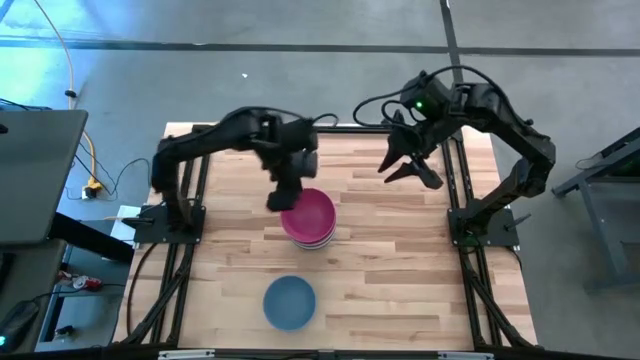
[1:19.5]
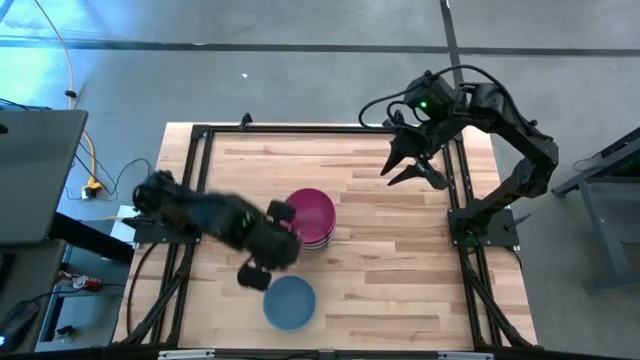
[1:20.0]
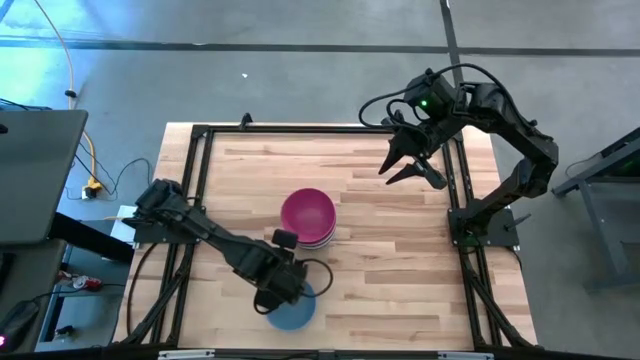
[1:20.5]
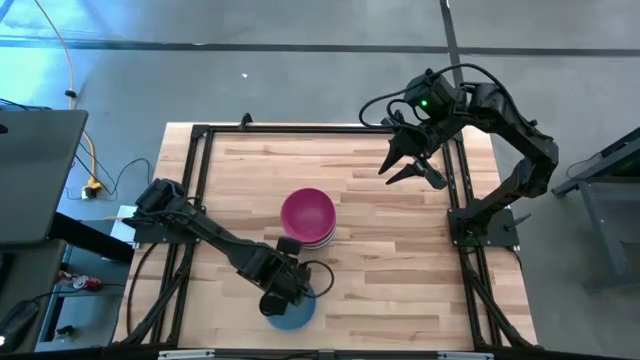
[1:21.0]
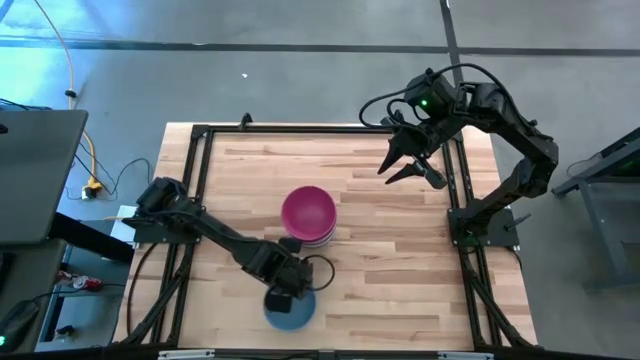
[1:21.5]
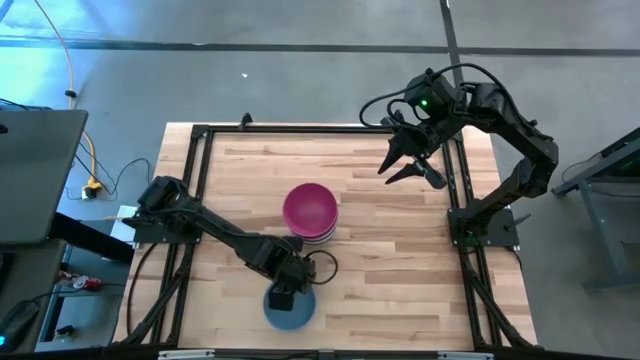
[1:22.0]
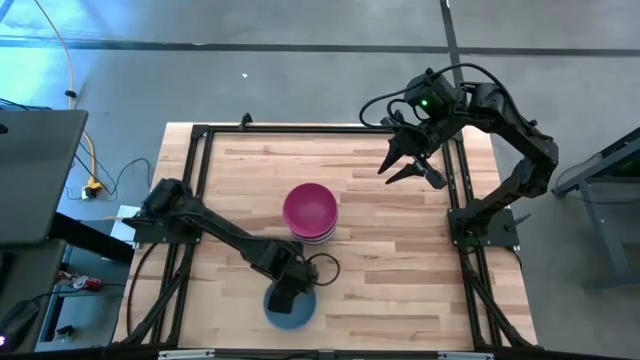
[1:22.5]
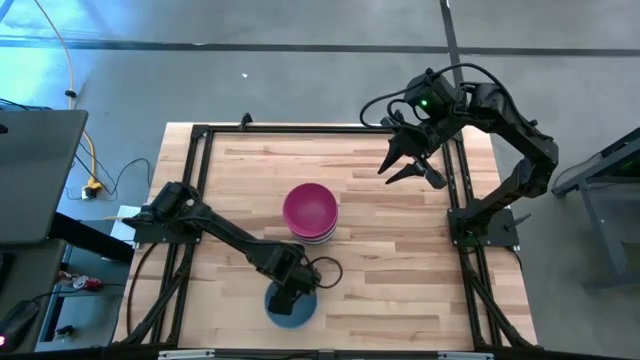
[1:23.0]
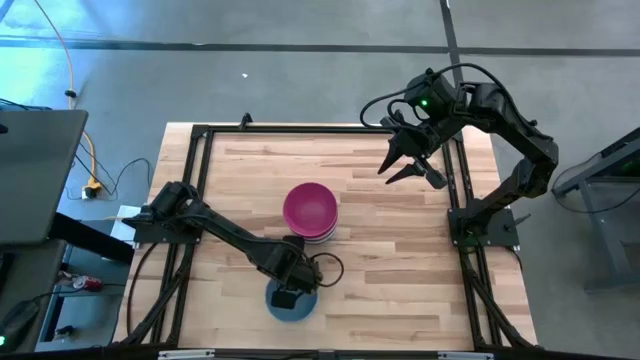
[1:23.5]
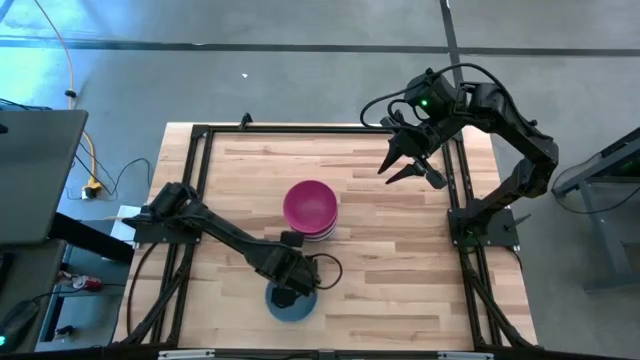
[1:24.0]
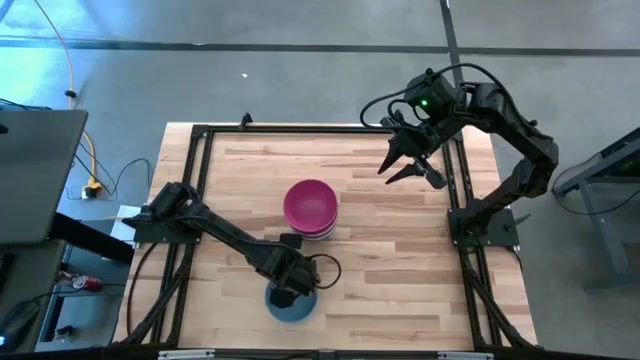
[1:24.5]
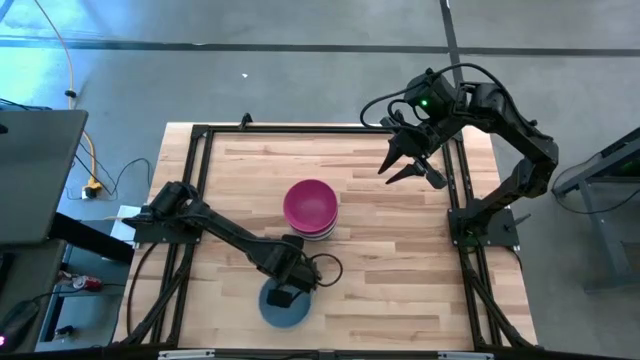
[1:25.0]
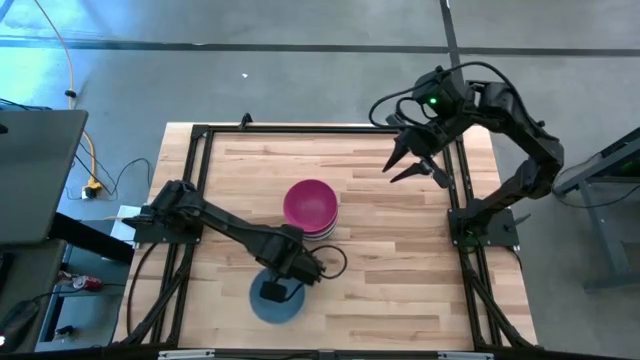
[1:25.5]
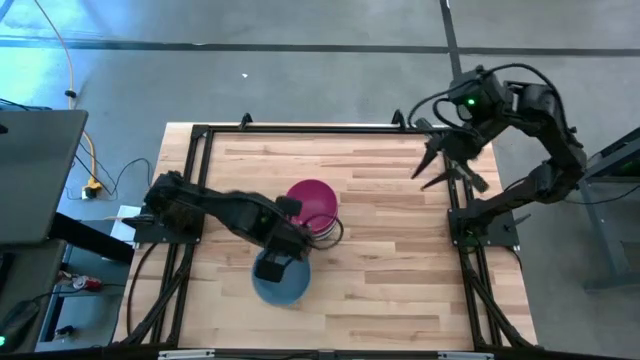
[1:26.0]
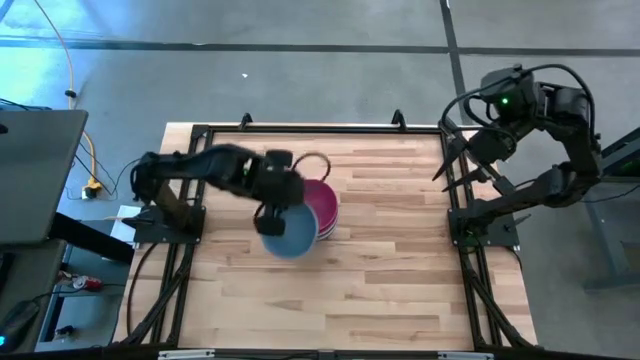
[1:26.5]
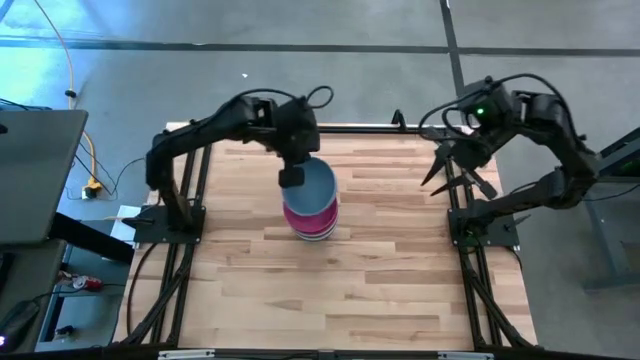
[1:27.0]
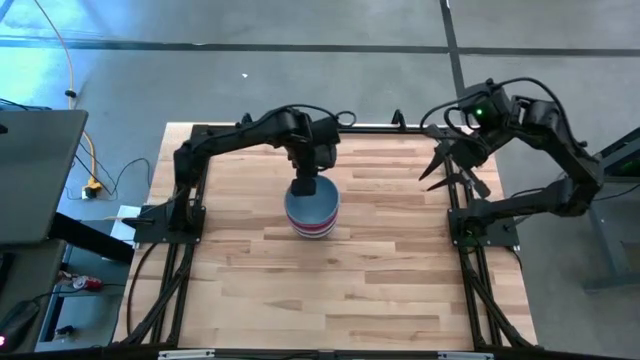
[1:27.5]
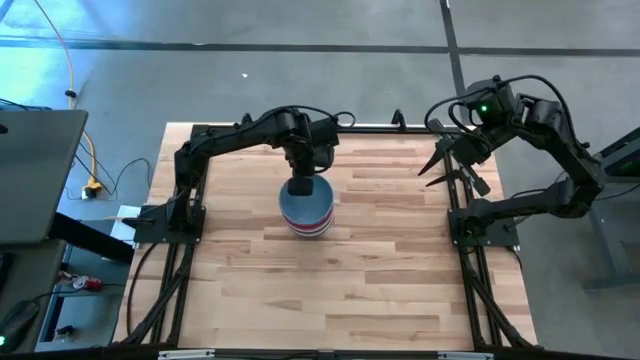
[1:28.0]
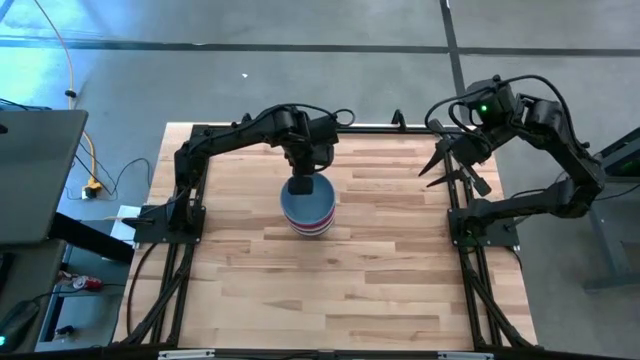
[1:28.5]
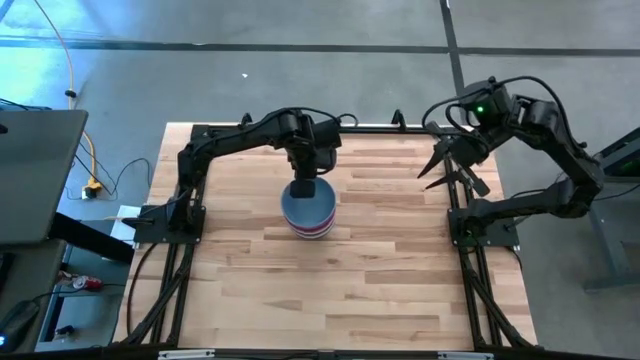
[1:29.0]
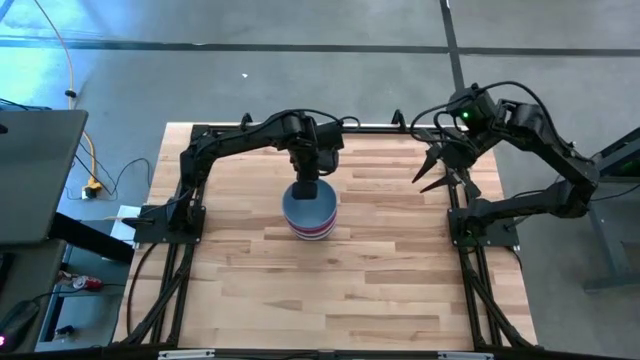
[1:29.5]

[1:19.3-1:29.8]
Task: Nest bowls inside each other
Stack the blue bowl on top of the pink bowl

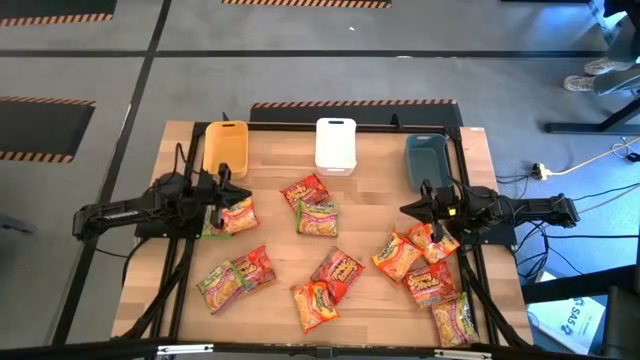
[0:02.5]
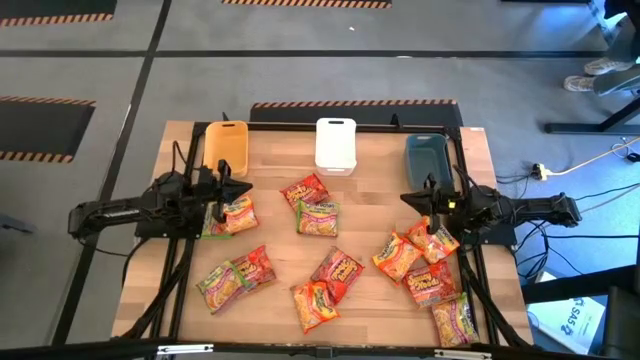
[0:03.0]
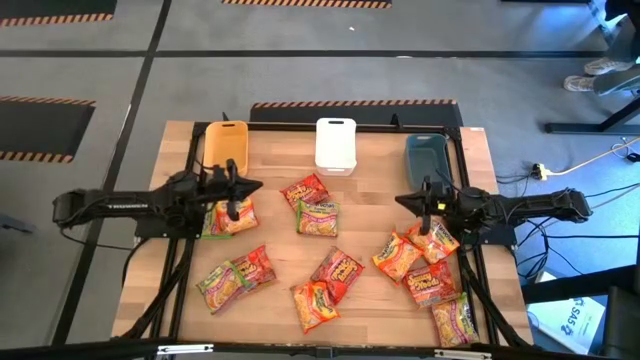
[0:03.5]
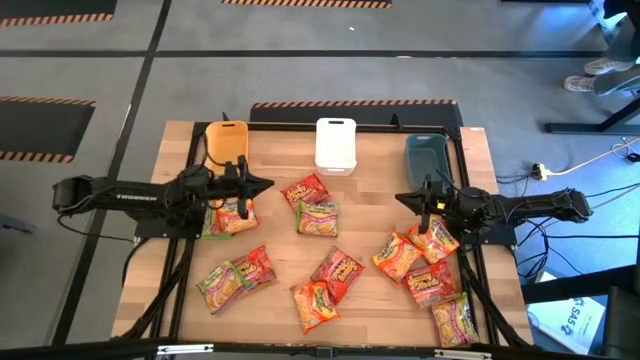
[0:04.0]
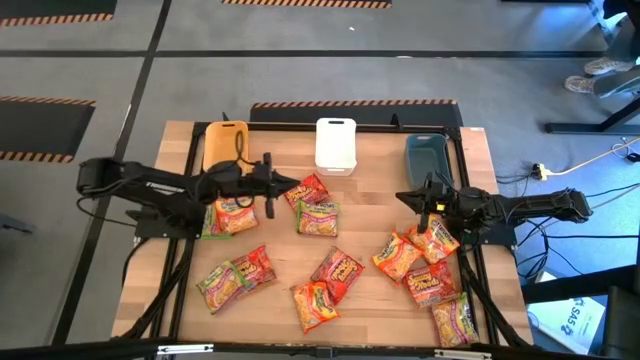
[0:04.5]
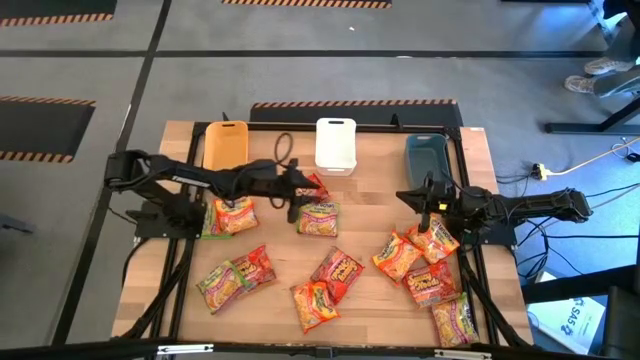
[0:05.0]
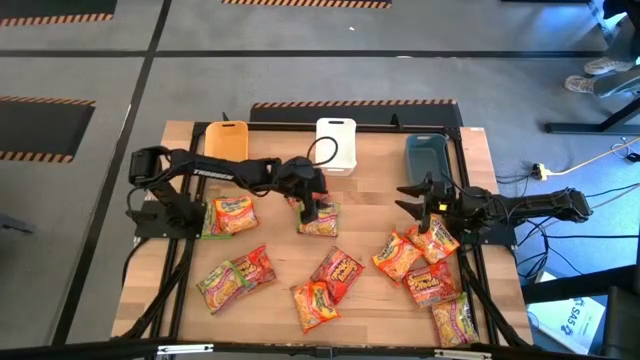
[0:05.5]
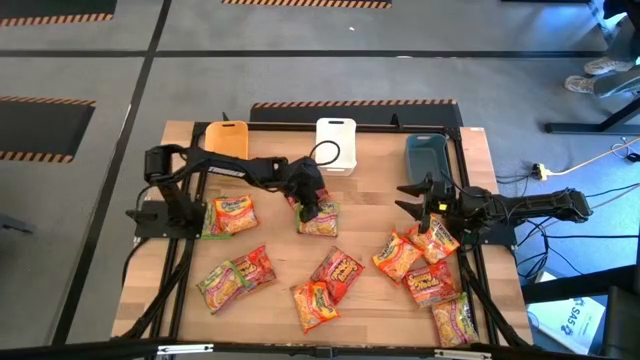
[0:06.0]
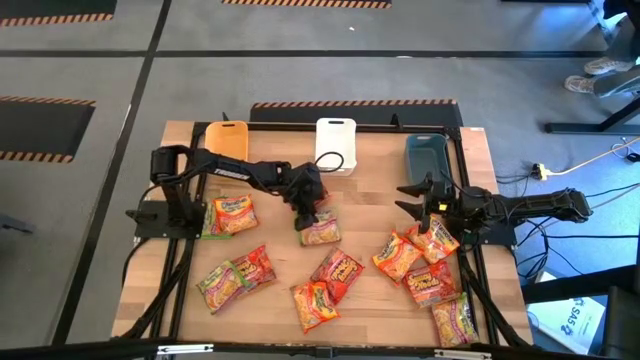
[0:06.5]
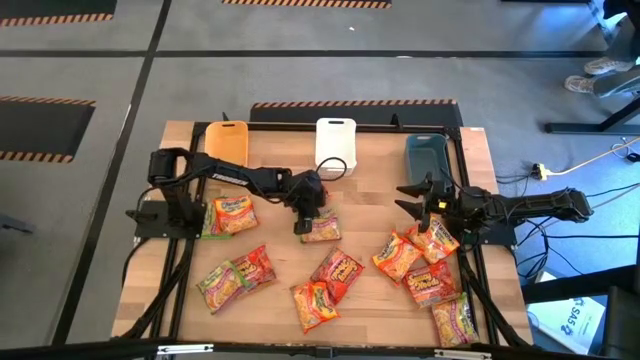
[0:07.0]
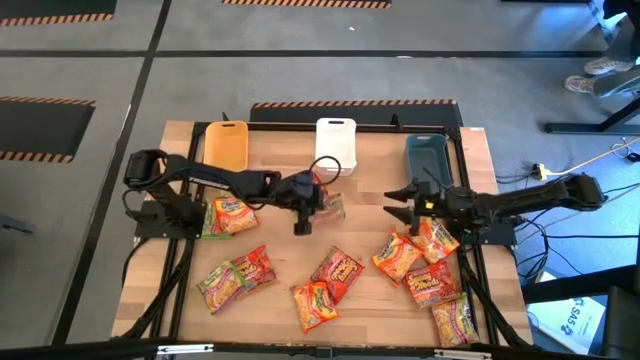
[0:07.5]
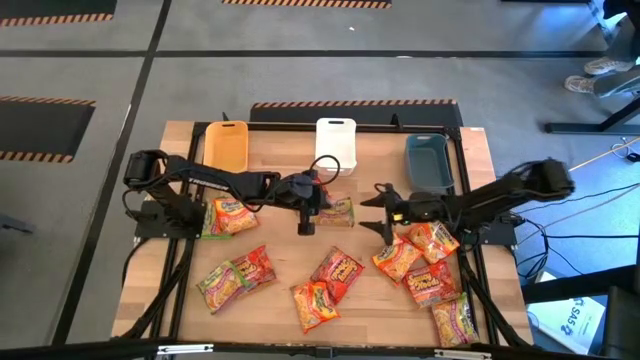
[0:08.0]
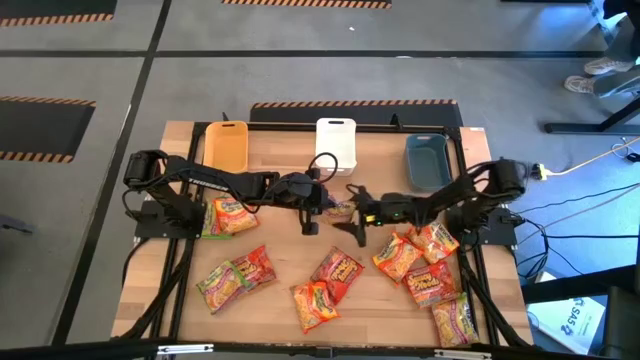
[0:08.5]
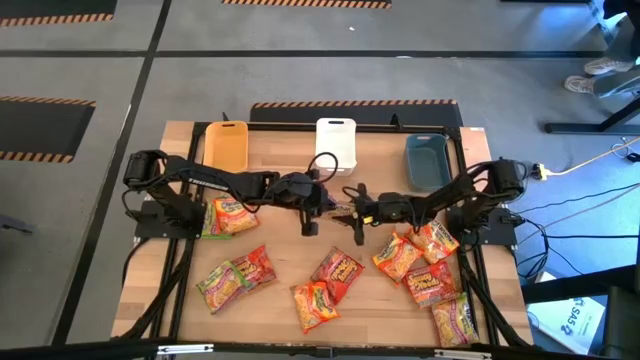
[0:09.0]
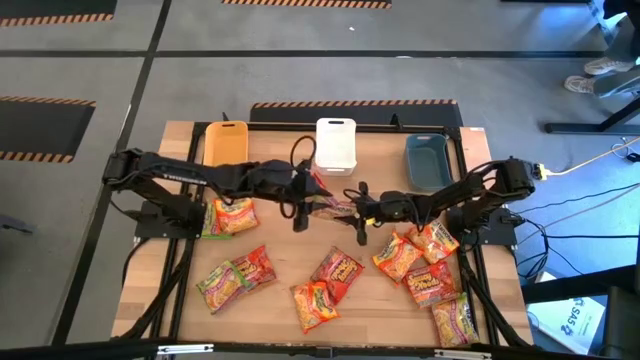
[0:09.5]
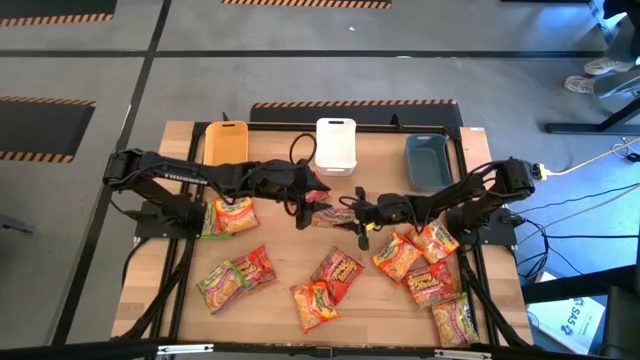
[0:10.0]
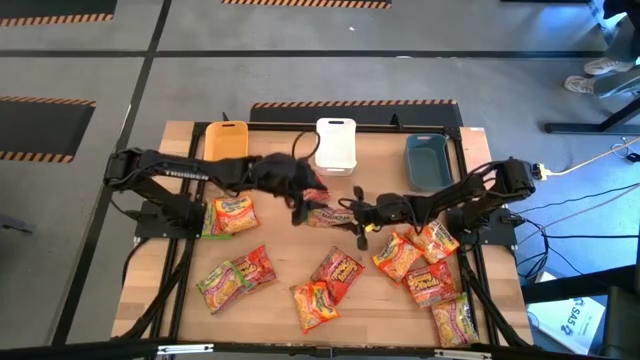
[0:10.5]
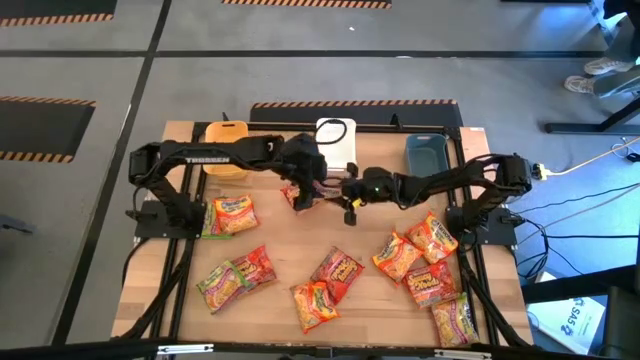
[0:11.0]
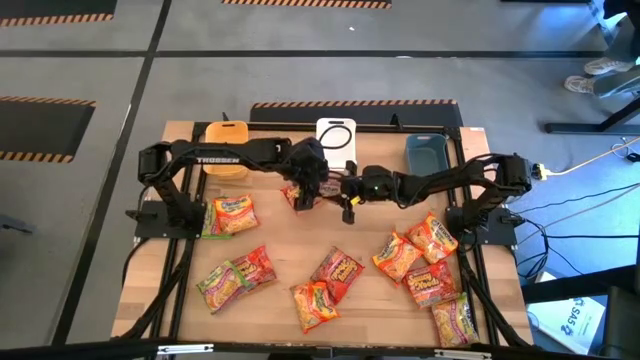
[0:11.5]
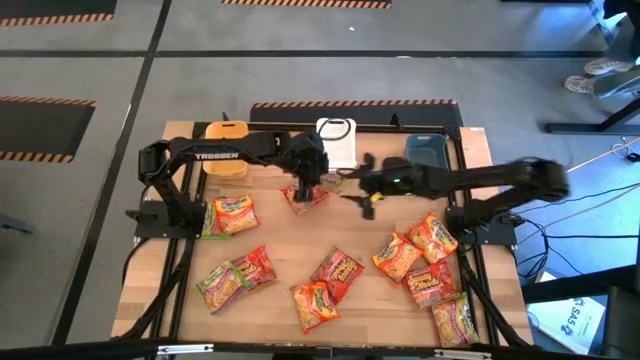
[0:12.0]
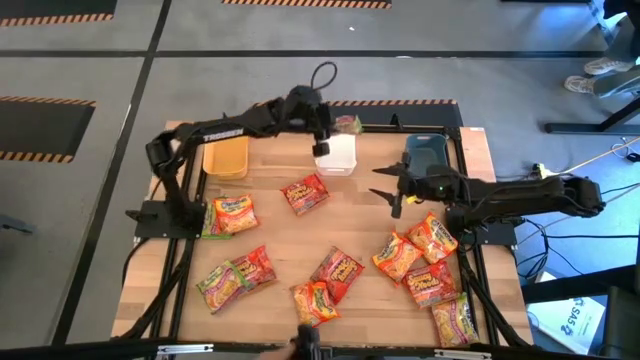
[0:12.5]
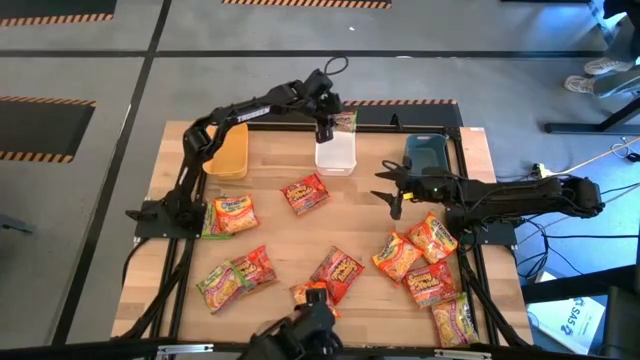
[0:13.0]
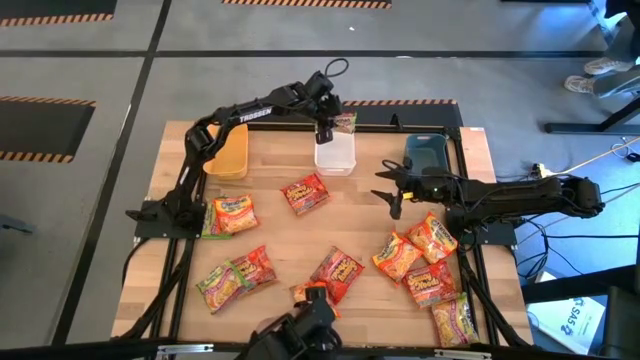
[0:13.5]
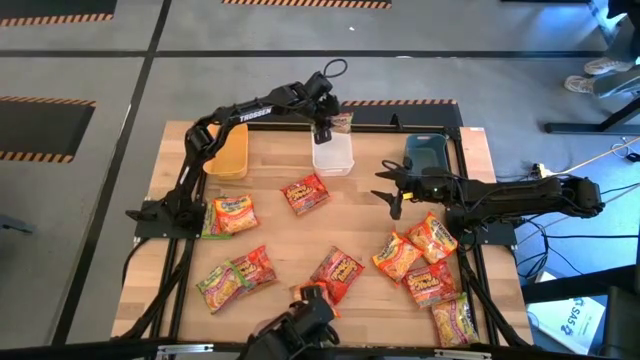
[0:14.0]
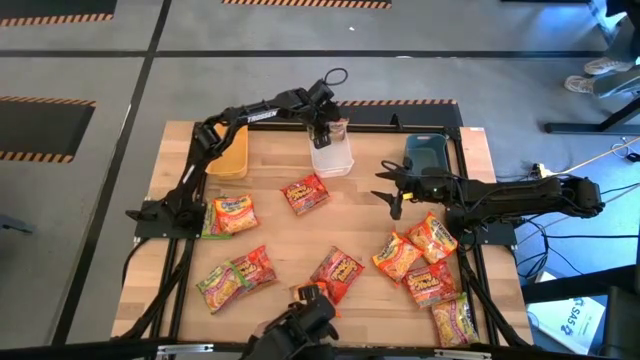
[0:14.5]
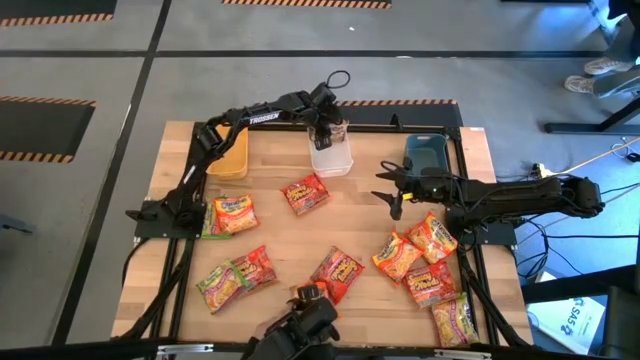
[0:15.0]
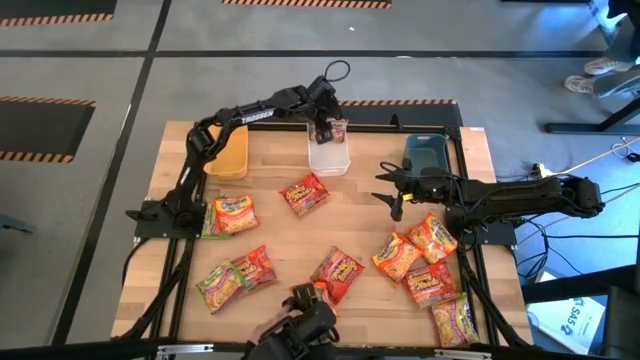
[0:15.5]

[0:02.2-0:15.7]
Task: Sort Maruchan noodles
Put the green noodle pack into the white bin
